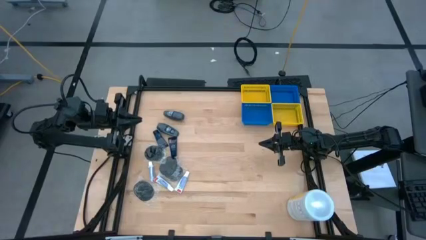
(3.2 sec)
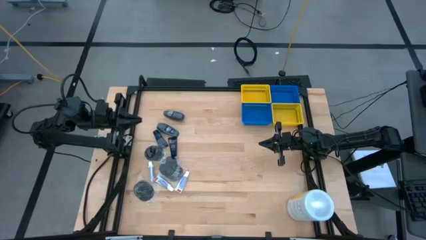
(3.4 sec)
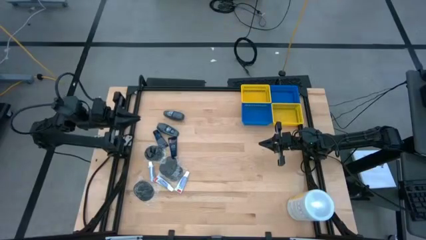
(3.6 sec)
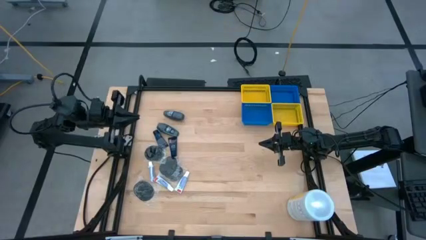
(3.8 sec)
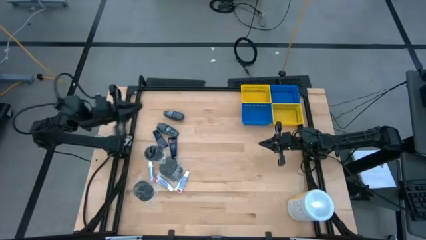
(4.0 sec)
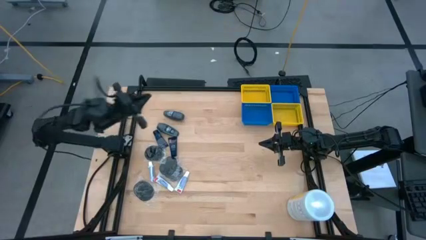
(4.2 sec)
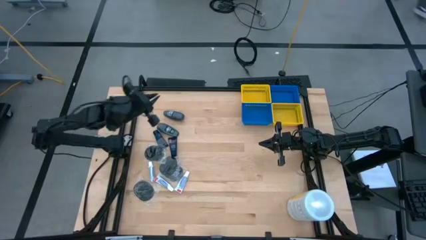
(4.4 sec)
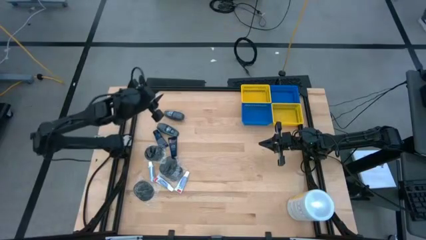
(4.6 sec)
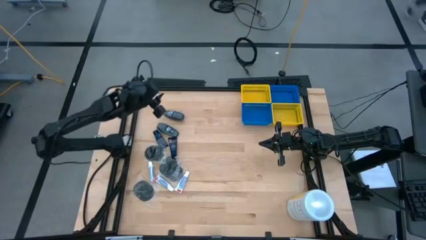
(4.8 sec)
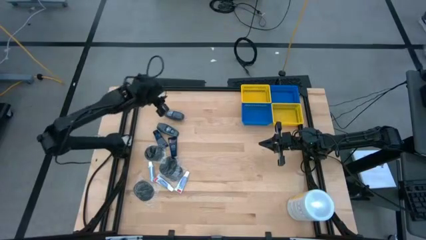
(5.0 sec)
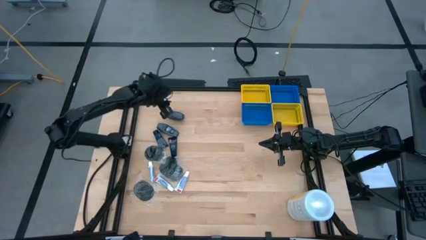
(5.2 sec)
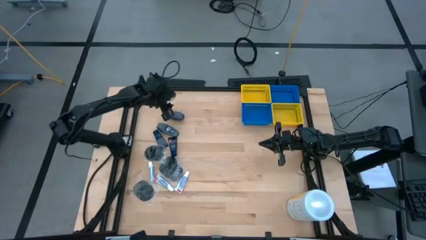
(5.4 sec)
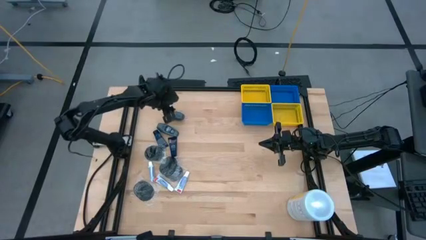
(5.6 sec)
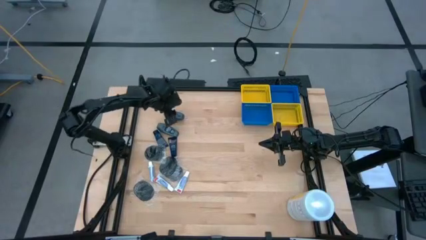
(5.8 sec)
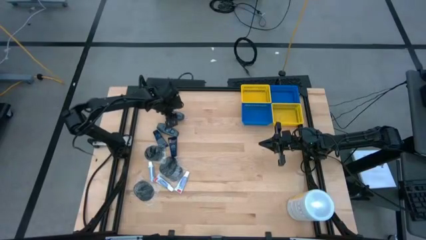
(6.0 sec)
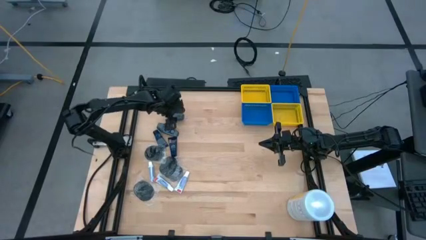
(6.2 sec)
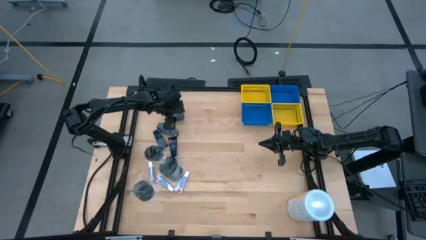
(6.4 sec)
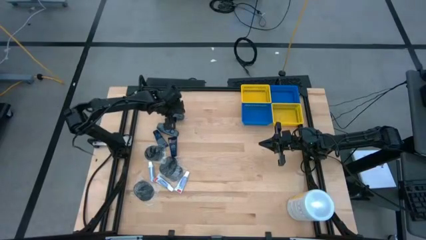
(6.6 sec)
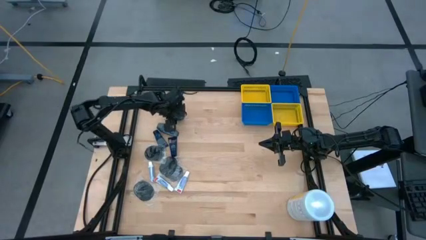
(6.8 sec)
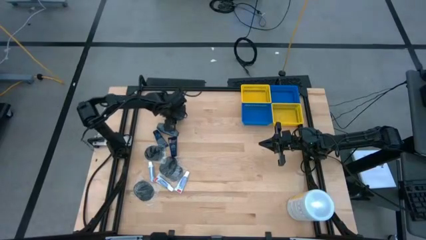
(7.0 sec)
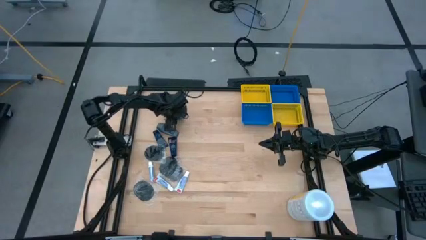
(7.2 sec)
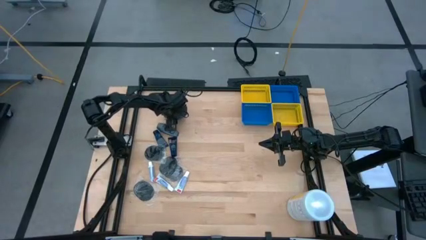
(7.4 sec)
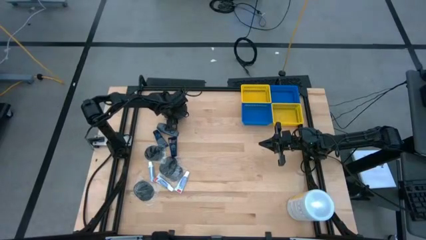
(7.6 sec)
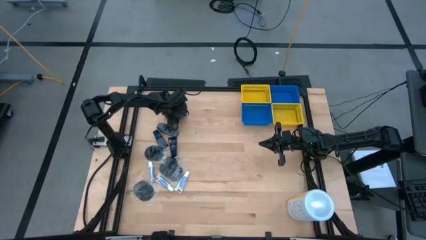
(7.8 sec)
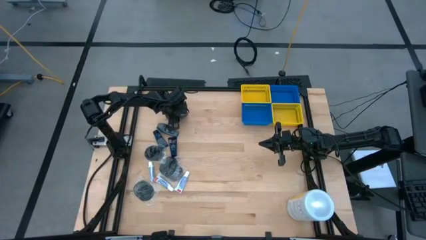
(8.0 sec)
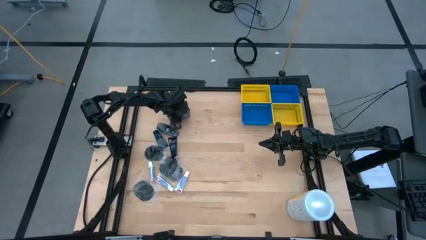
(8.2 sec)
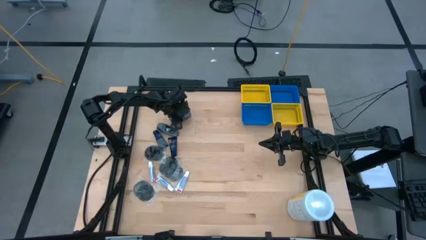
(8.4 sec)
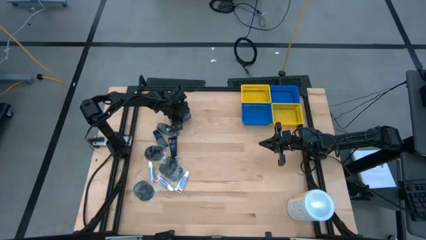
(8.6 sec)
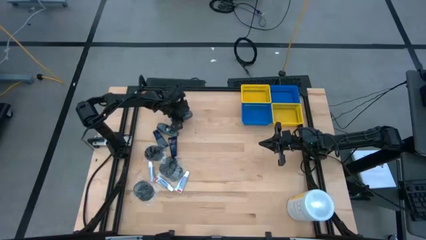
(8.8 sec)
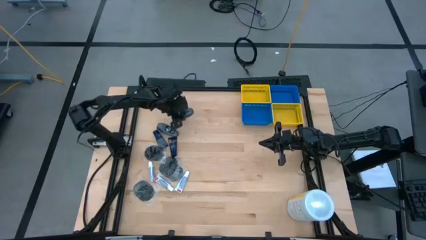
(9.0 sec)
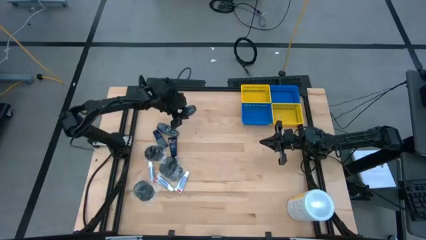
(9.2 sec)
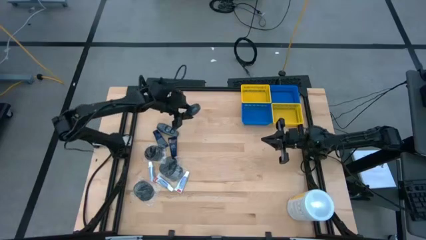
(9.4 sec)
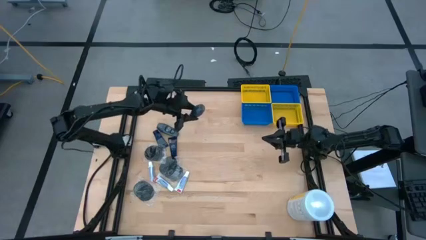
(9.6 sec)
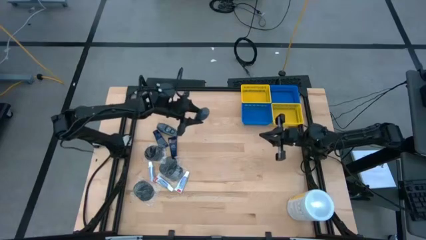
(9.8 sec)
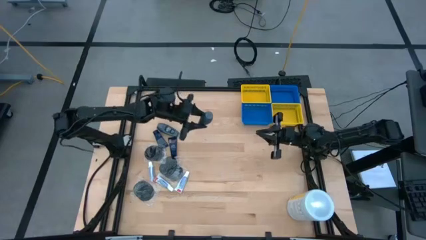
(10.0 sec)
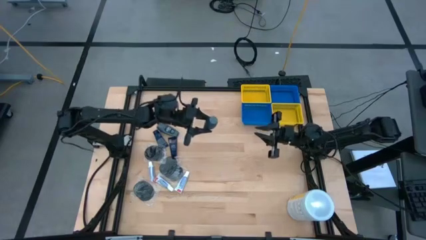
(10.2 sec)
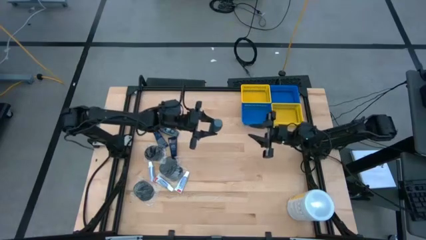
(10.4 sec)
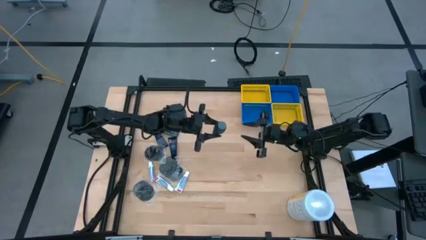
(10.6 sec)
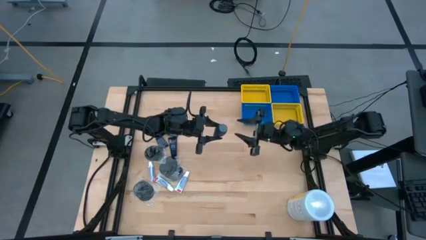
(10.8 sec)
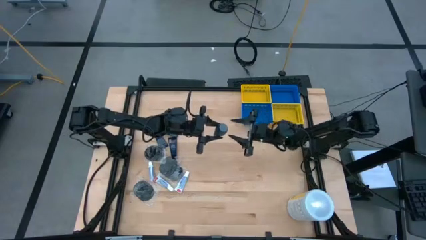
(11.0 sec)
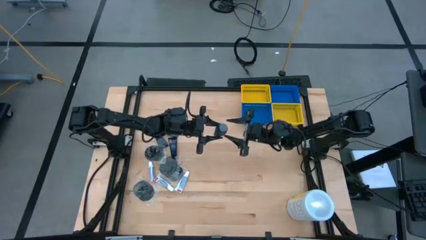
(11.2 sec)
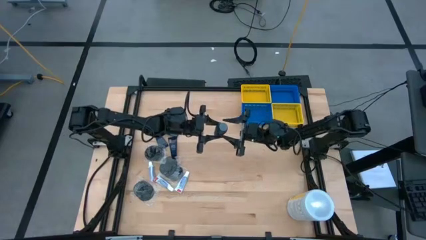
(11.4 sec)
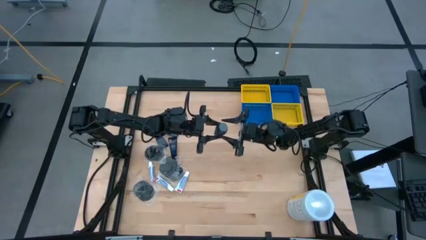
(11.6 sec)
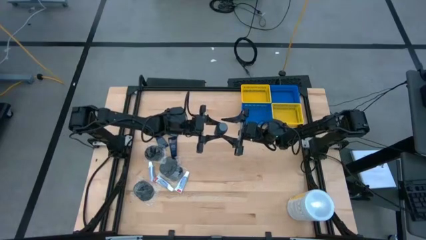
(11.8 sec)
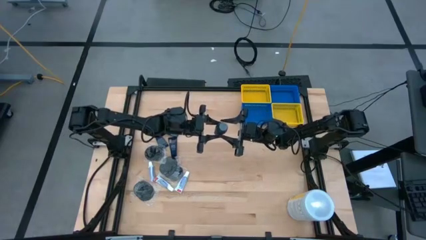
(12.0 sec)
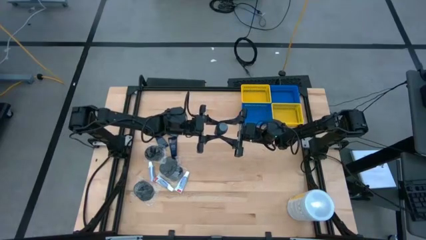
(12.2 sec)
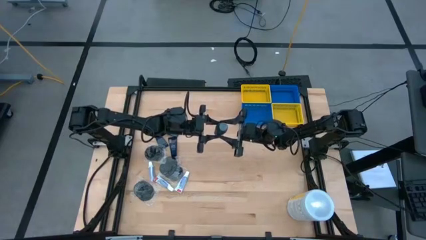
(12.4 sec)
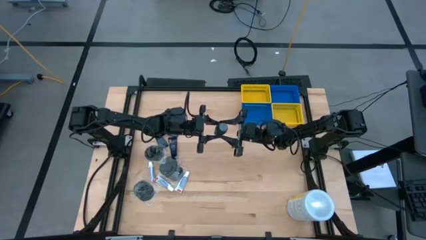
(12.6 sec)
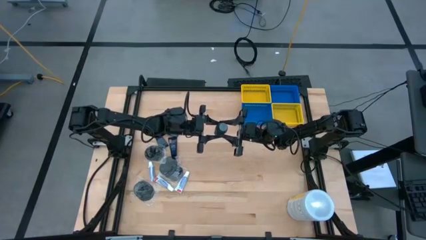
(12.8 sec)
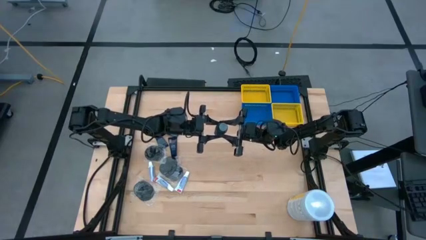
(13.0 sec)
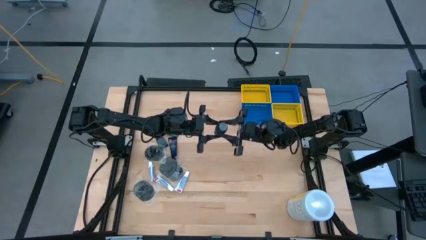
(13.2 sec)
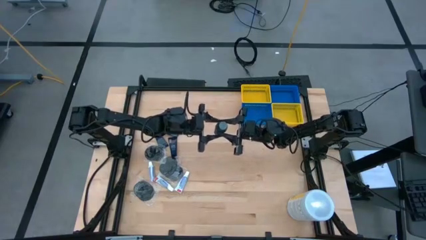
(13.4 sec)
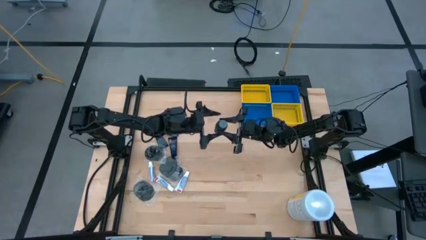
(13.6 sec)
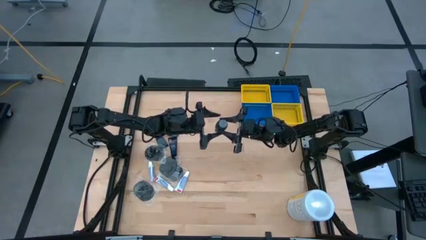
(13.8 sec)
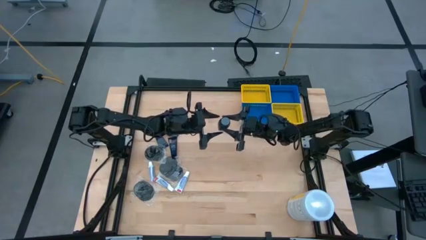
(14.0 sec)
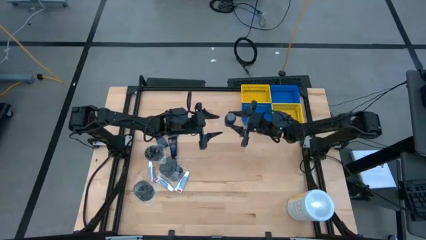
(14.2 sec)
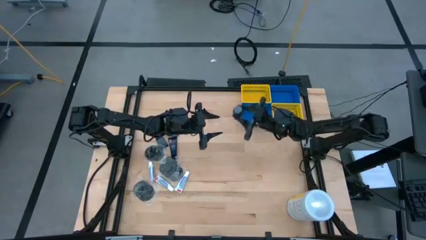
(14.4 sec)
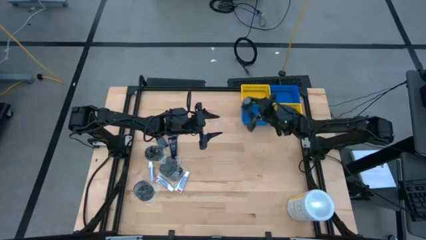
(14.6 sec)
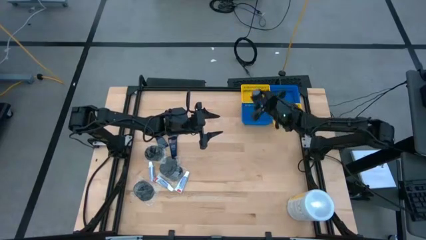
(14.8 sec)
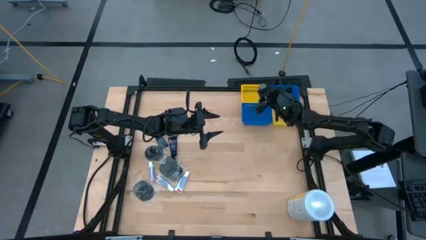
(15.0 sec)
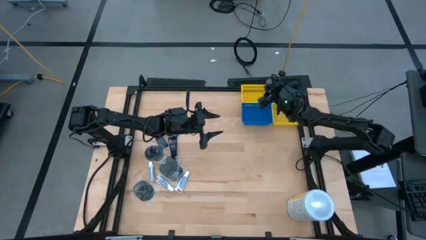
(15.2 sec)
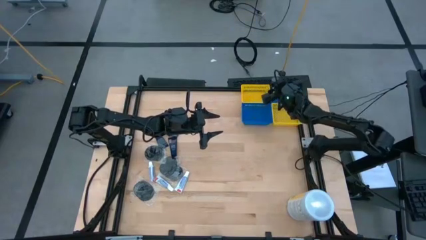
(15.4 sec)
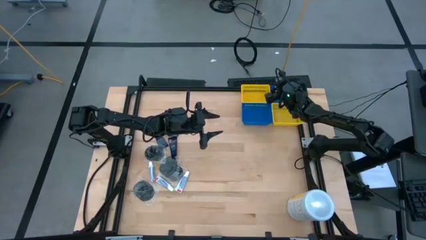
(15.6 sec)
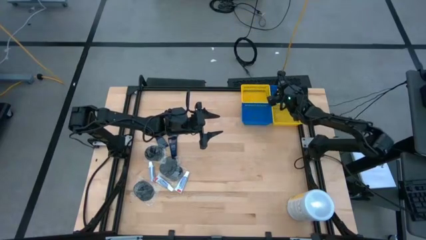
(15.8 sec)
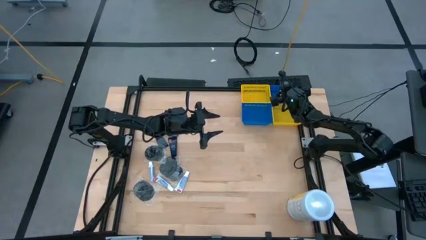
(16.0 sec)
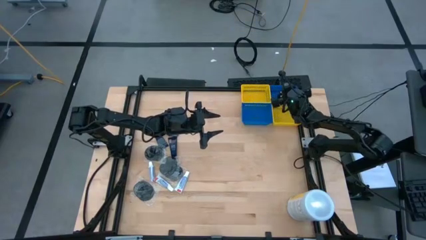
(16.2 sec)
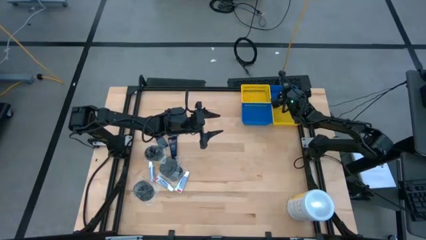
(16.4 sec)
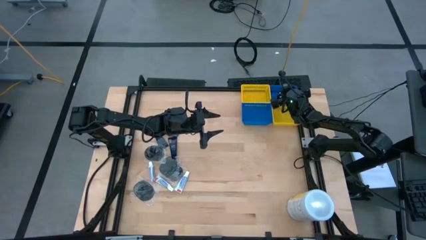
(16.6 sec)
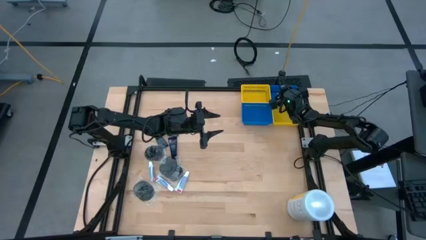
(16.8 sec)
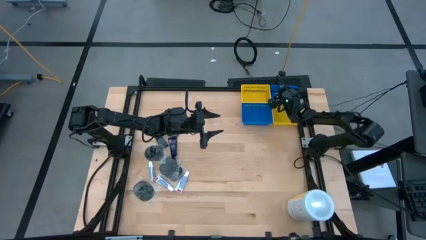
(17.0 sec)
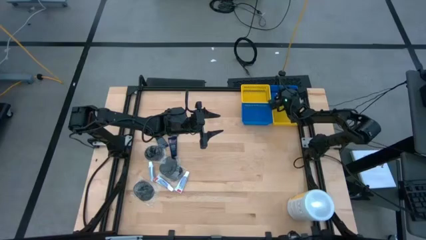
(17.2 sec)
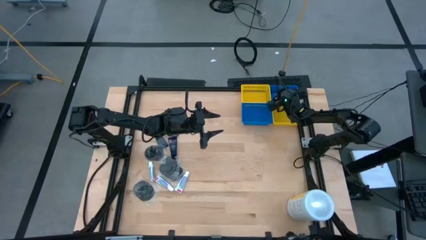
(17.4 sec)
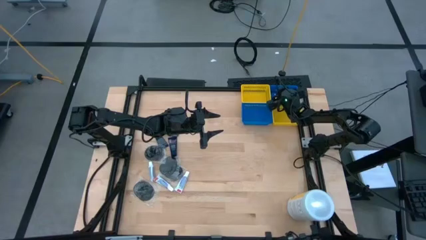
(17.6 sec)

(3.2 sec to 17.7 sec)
Task: Pick & Place Travel size toiletries
Put the top gray deodorant into the top blue basket
